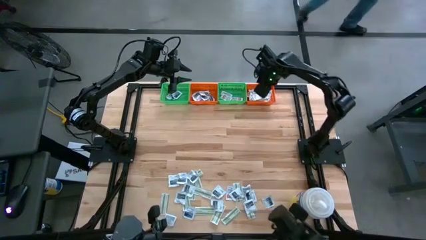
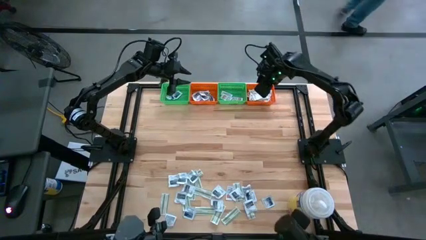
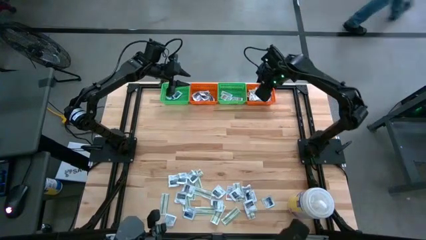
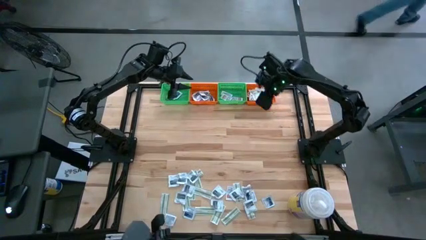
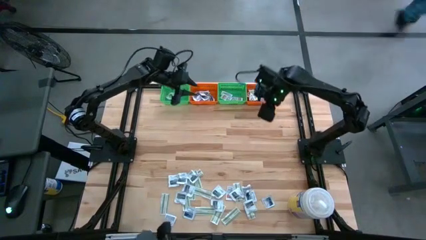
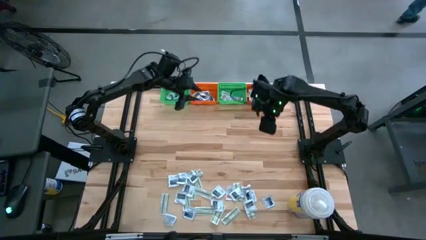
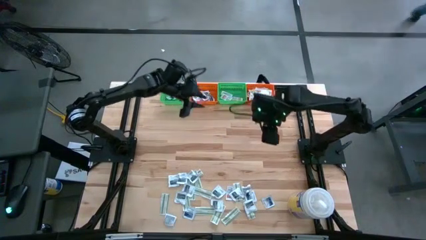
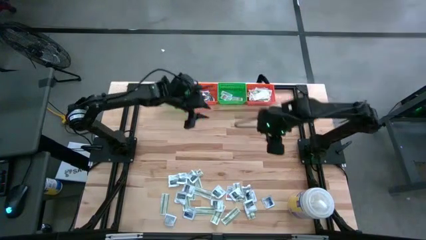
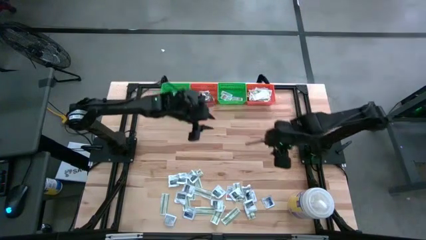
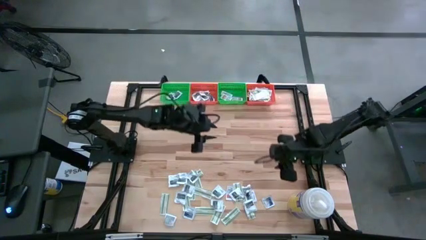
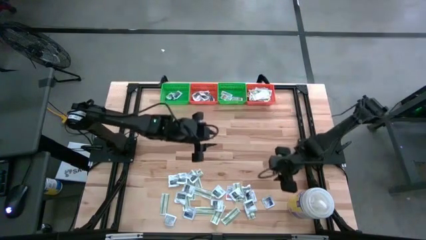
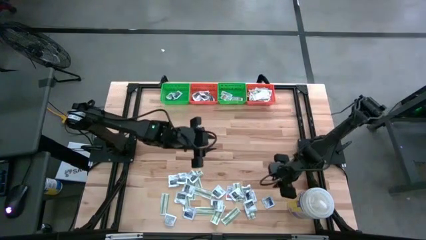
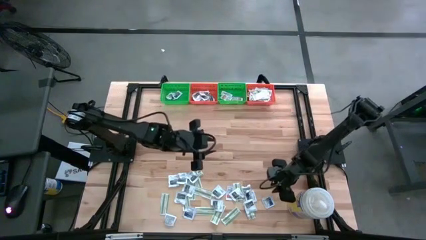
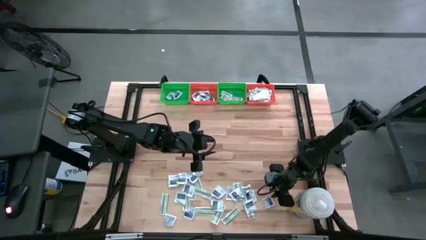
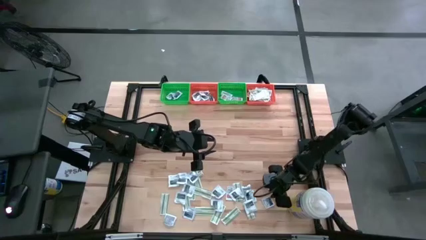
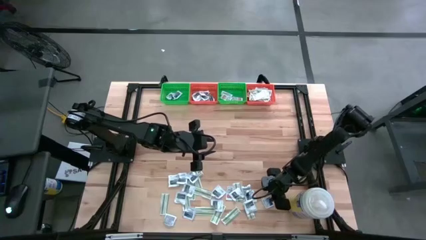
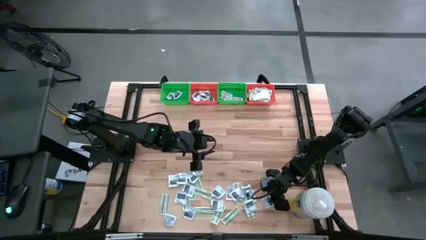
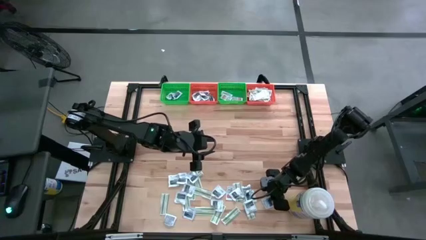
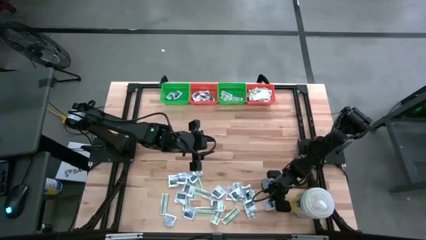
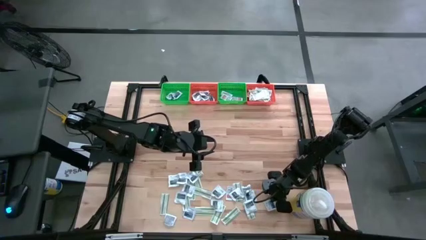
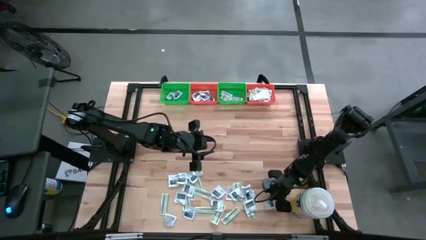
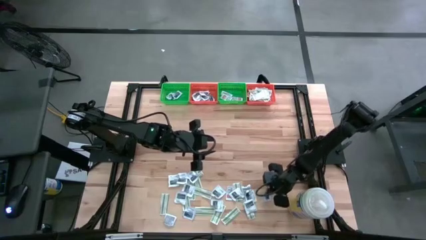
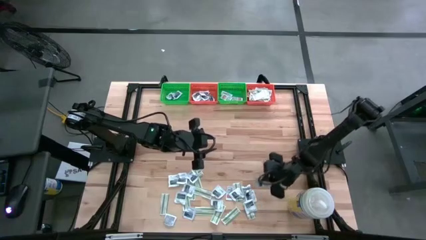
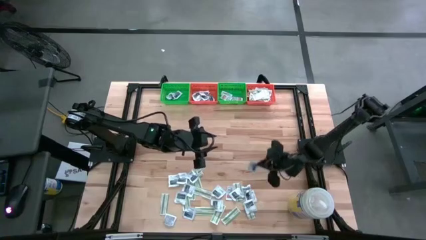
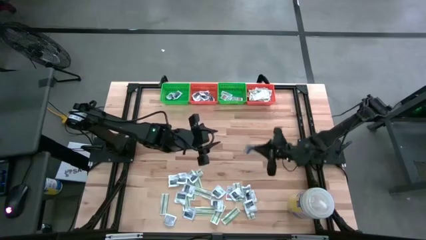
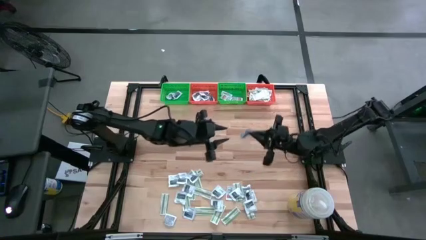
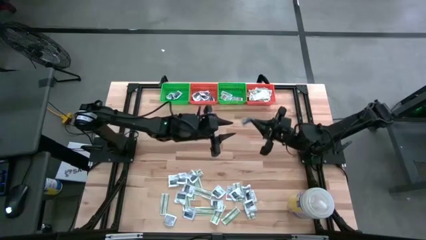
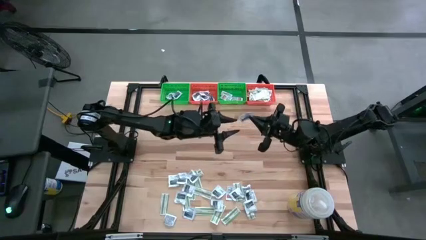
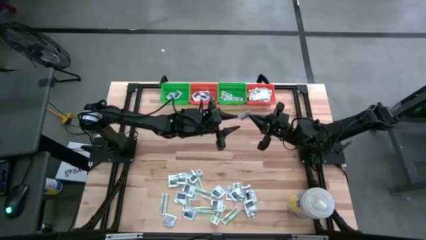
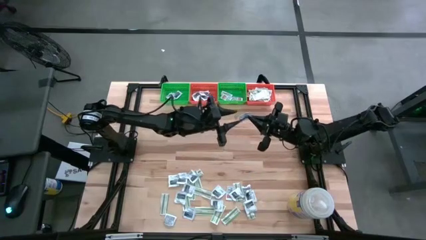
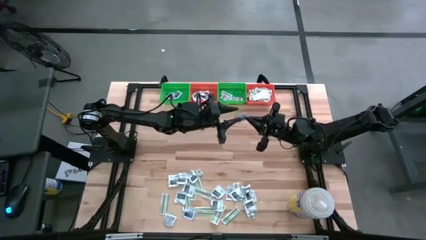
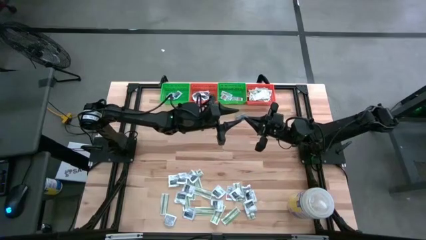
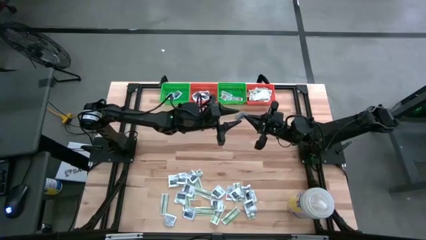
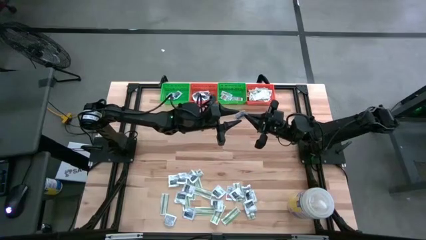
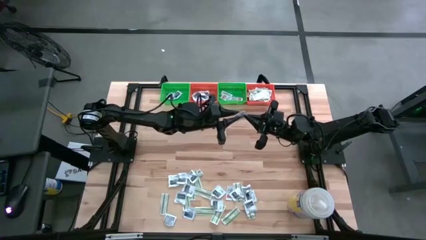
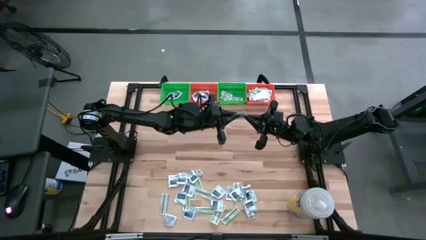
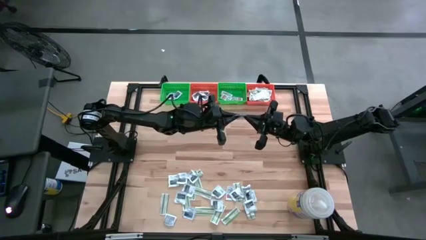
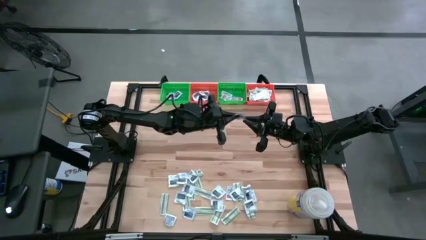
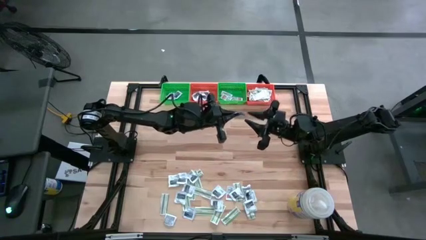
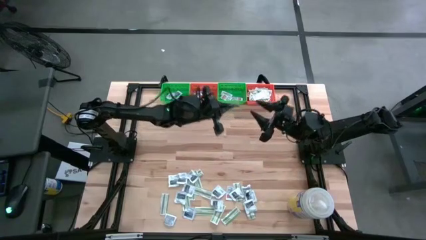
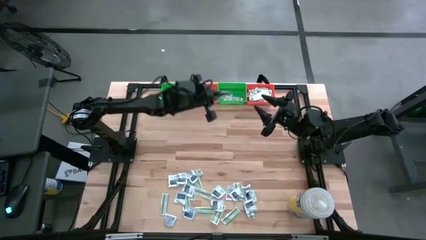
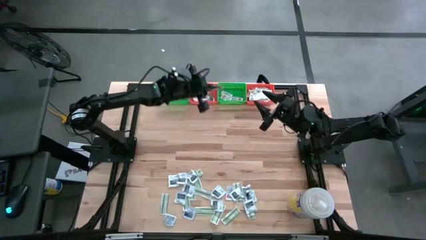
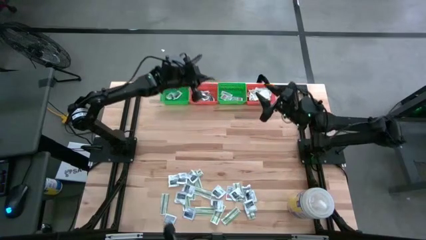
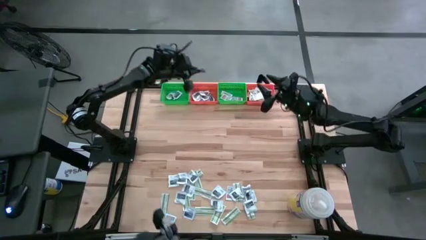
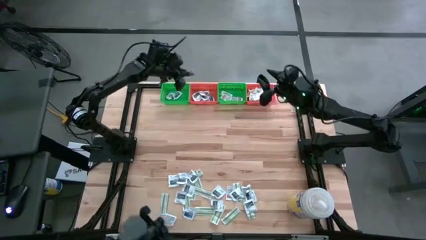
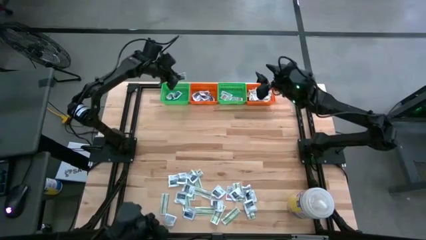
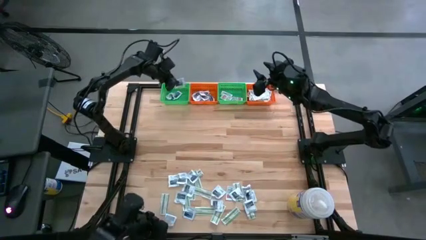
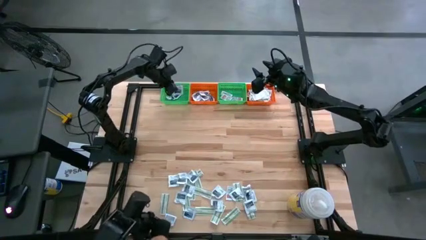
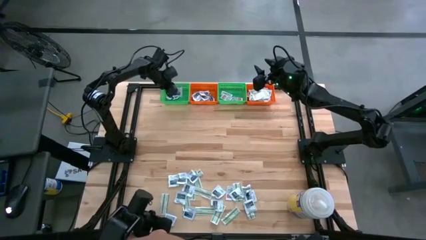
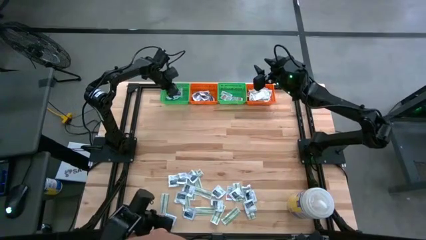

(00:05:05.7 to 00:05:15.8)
Task: Pick & Place First Aid Supplies
Put the blue alcohol pad in the left green bin

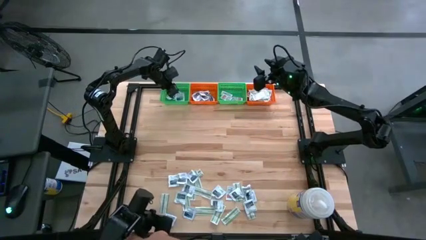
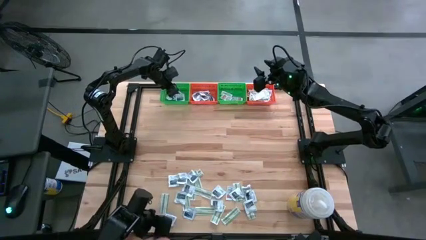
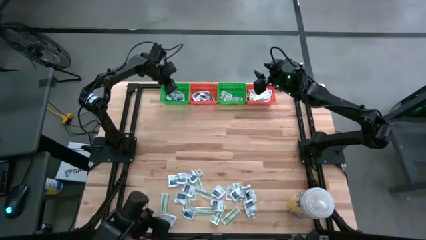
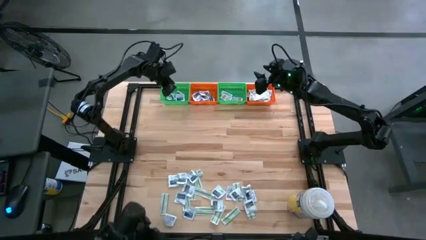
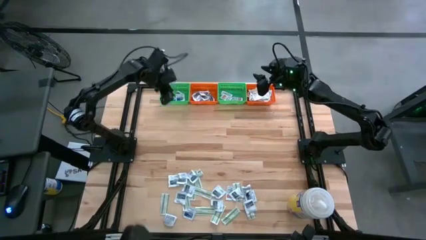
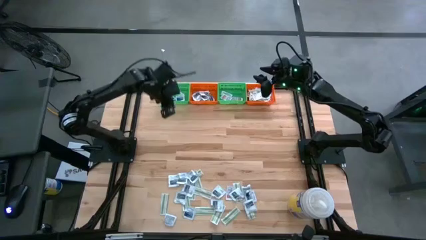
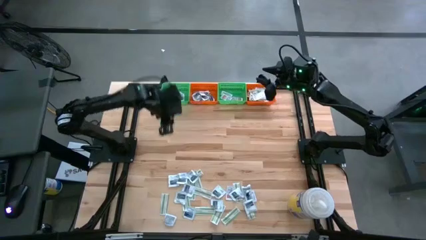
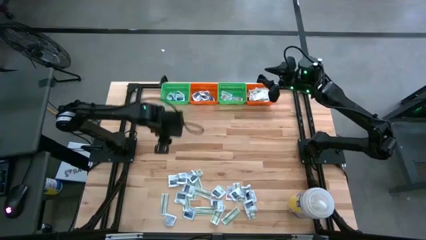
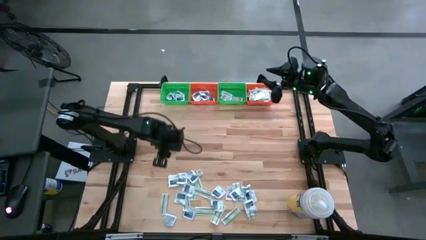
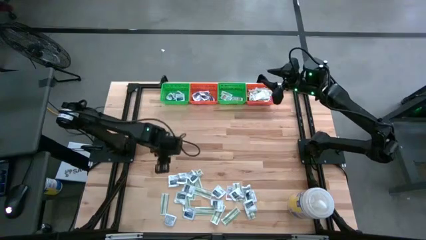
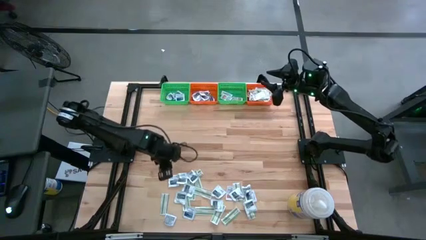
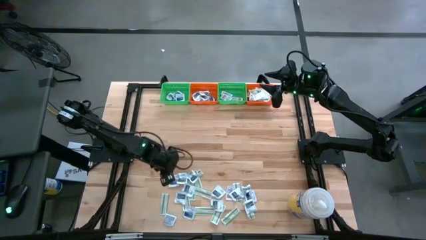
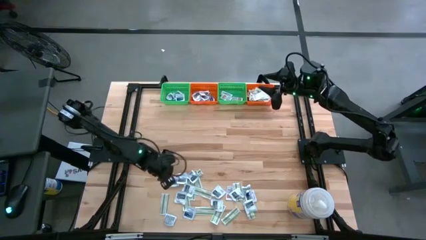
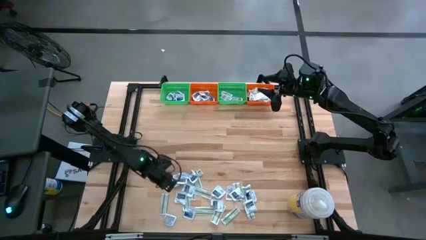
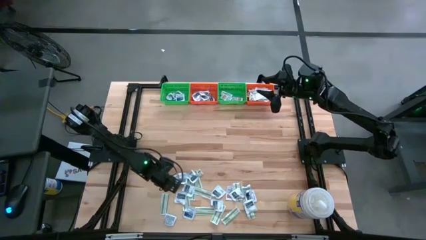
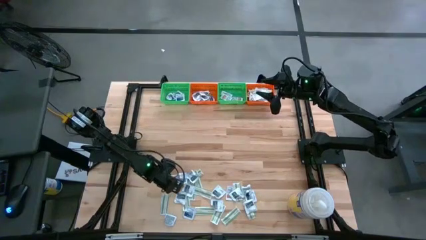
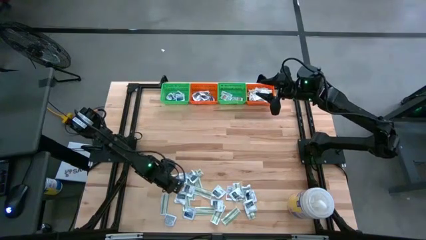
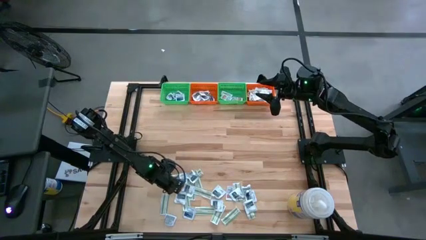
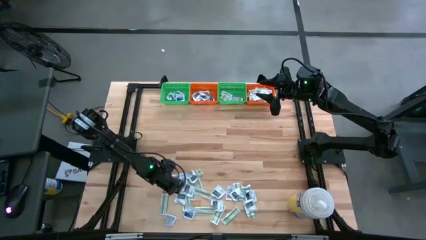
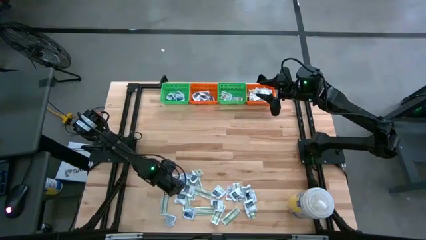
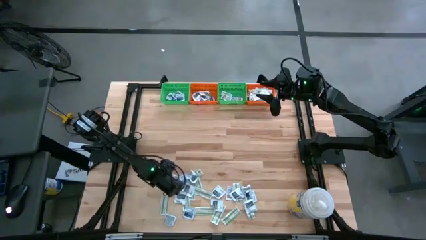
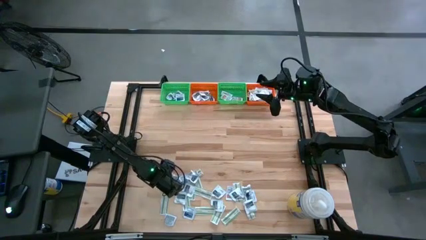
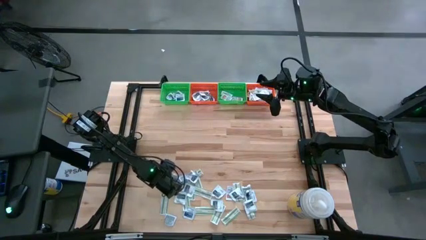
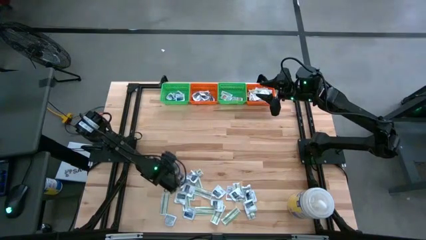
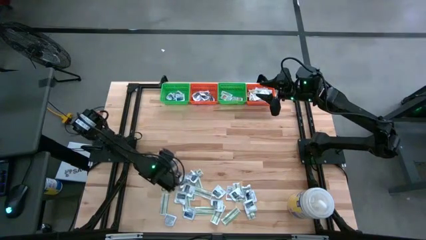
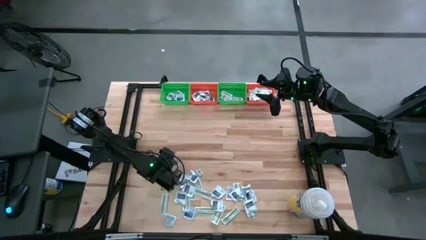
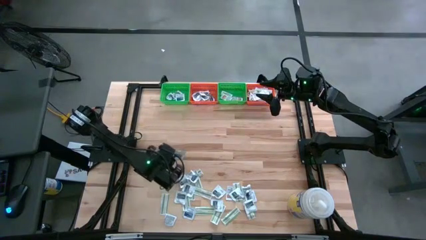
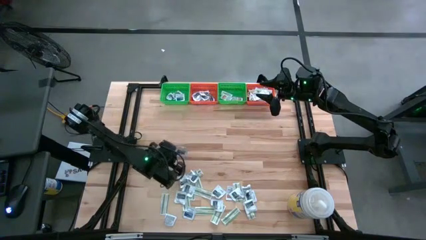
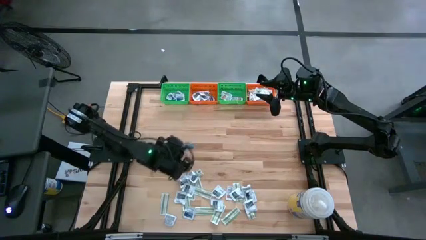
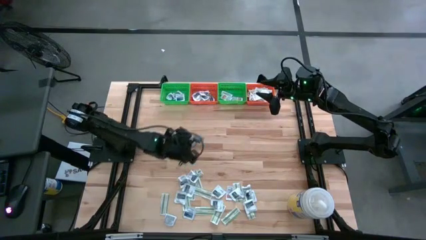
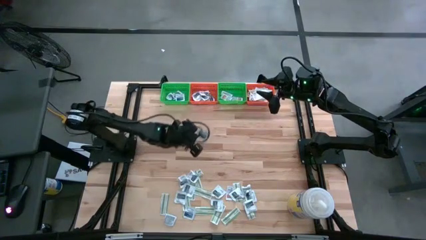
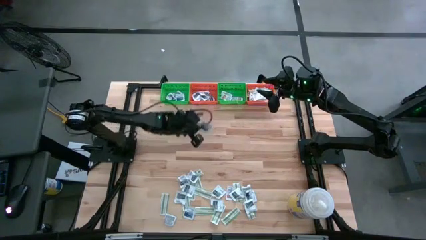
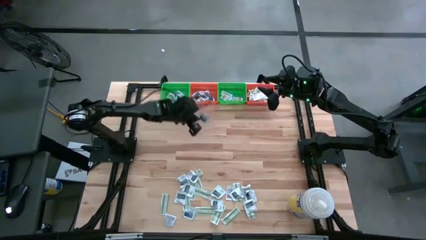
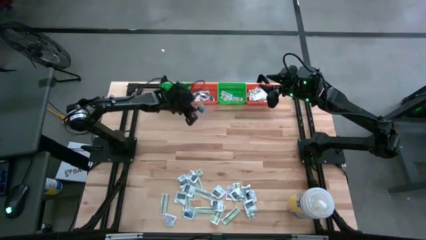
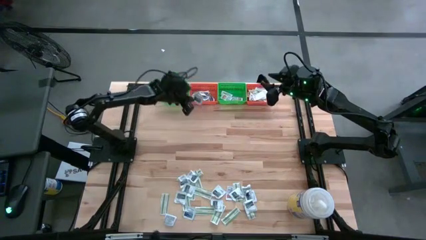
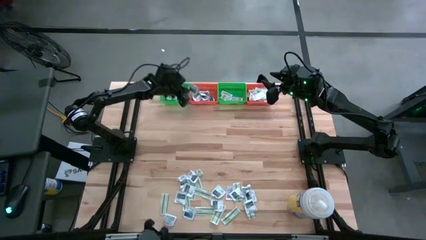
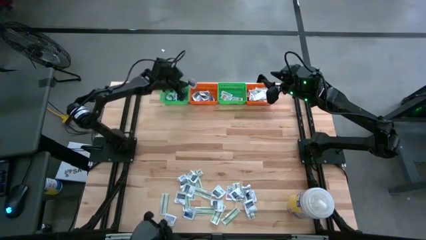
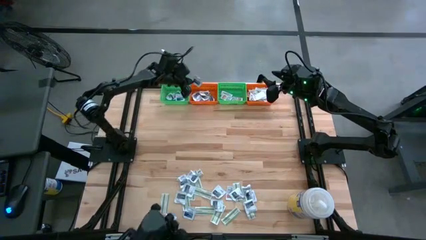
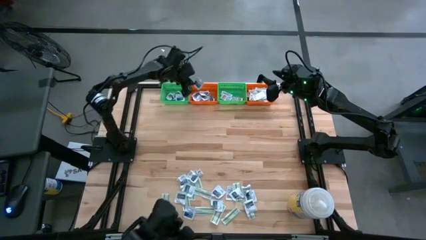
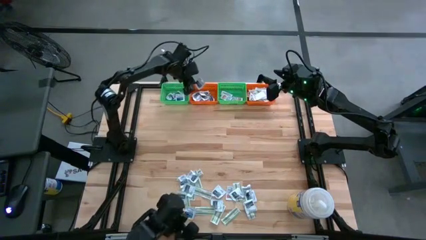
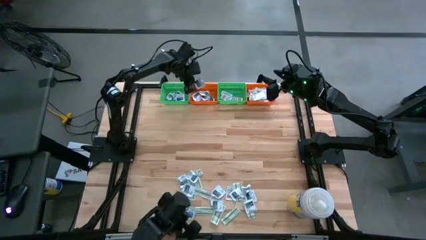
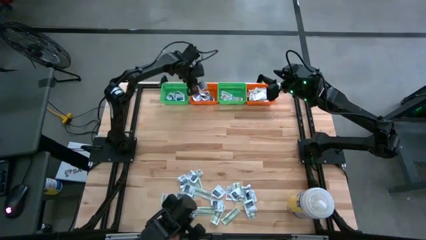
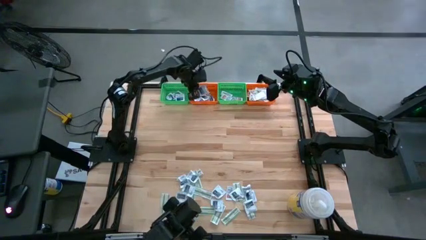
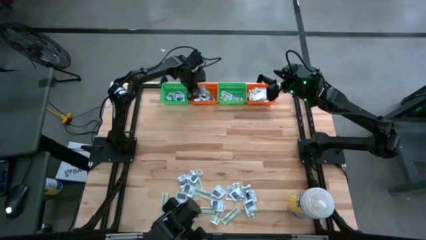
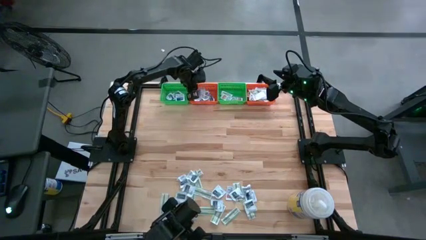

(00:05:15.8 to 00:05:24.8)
Put the gray towelette pack in the left orange bin
